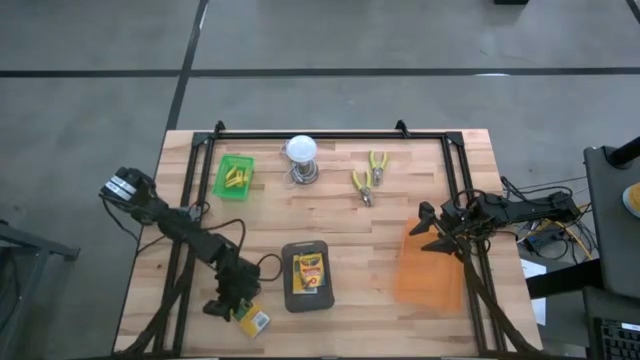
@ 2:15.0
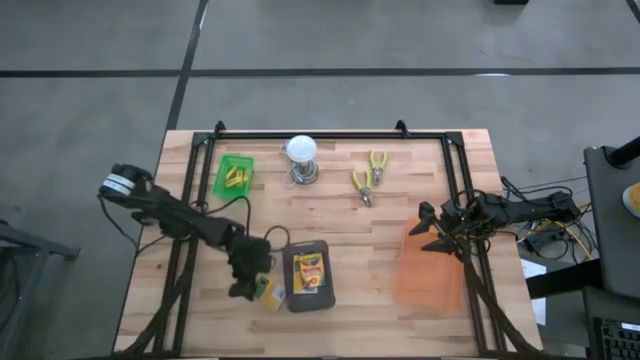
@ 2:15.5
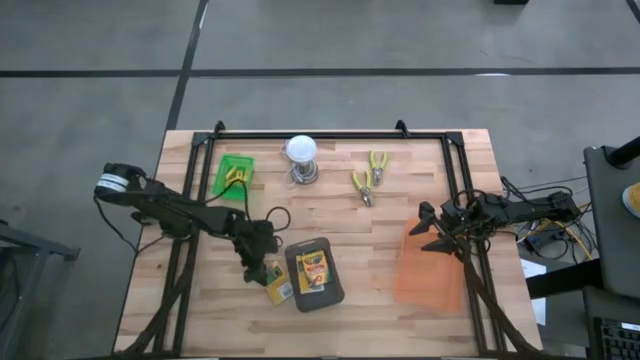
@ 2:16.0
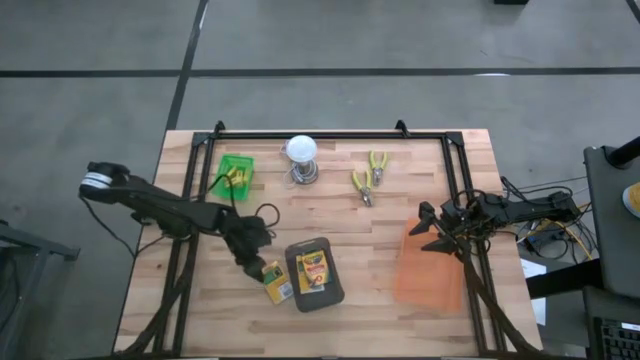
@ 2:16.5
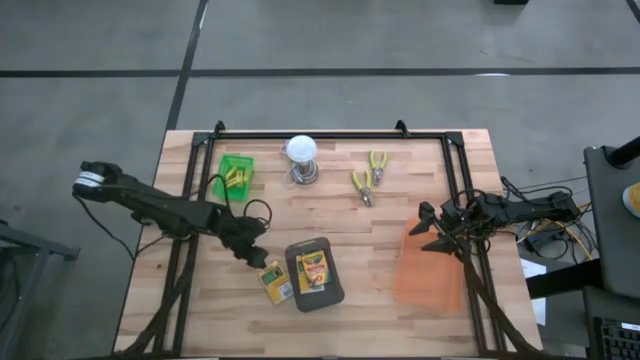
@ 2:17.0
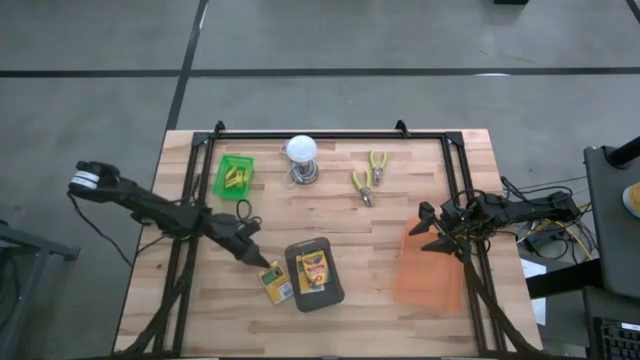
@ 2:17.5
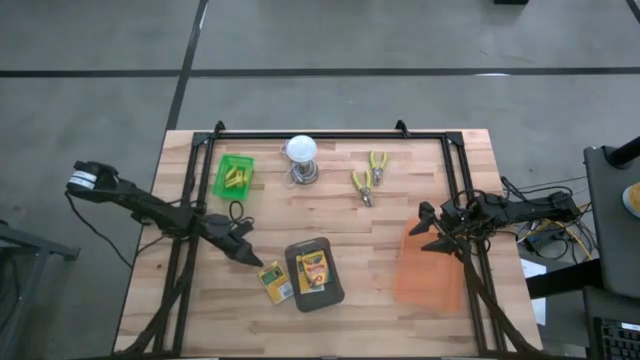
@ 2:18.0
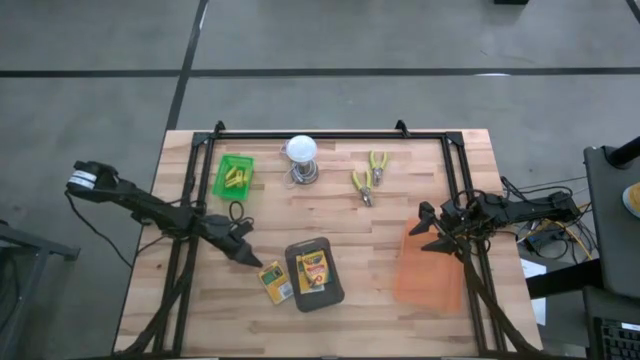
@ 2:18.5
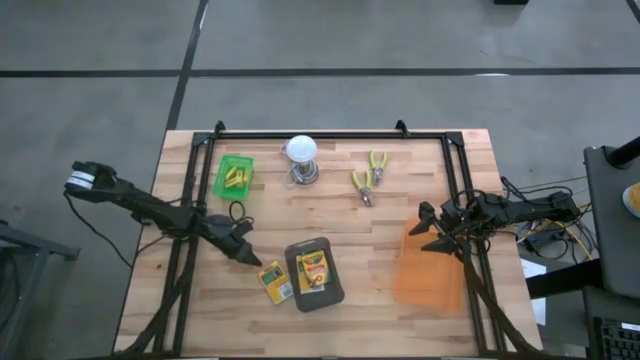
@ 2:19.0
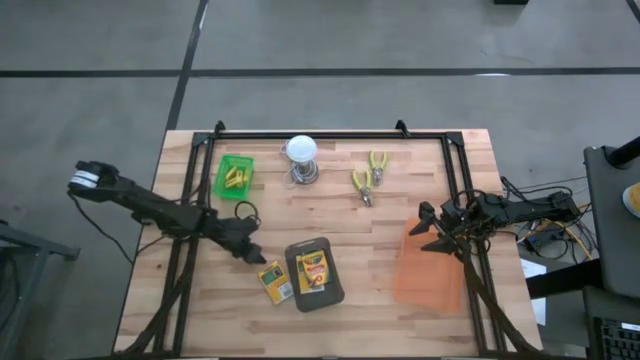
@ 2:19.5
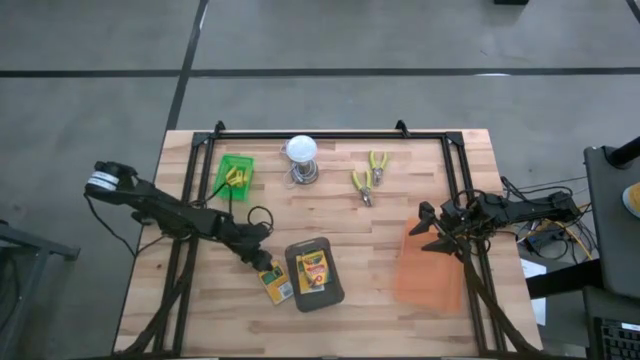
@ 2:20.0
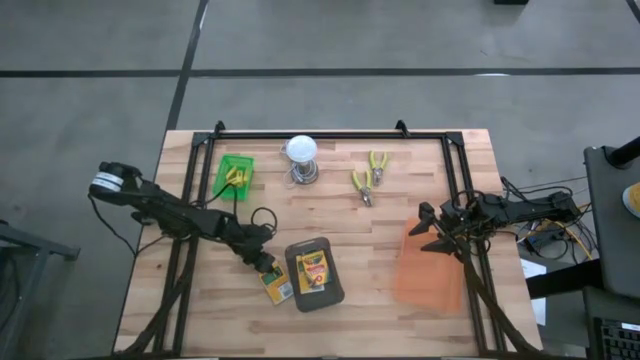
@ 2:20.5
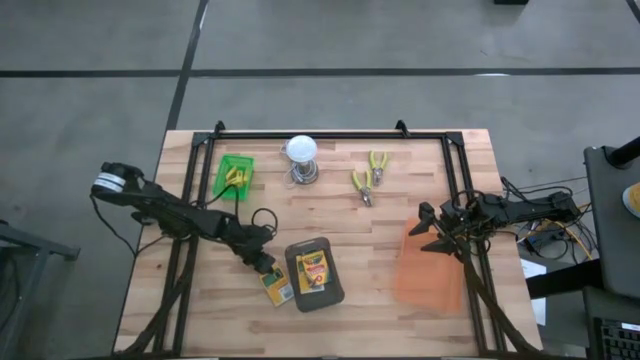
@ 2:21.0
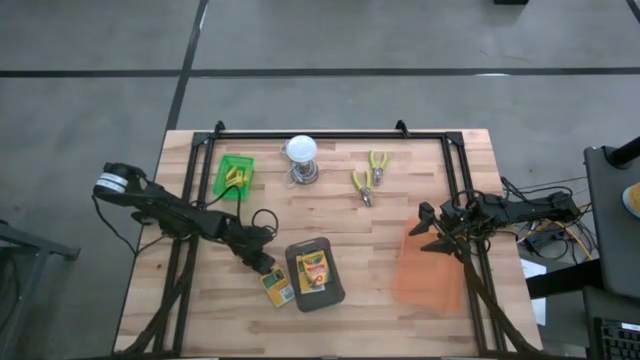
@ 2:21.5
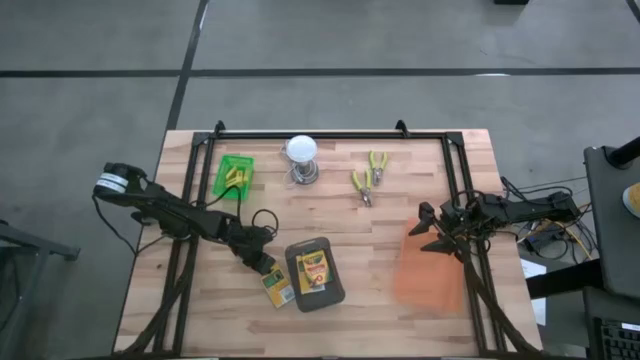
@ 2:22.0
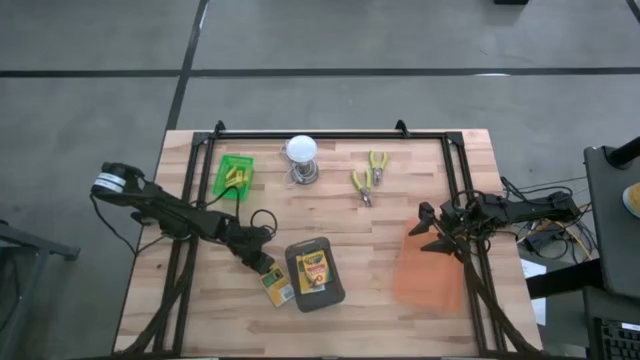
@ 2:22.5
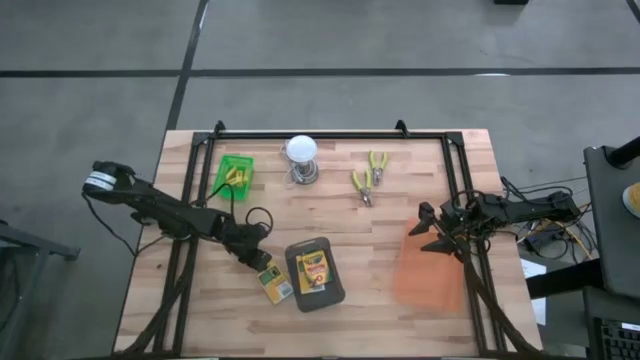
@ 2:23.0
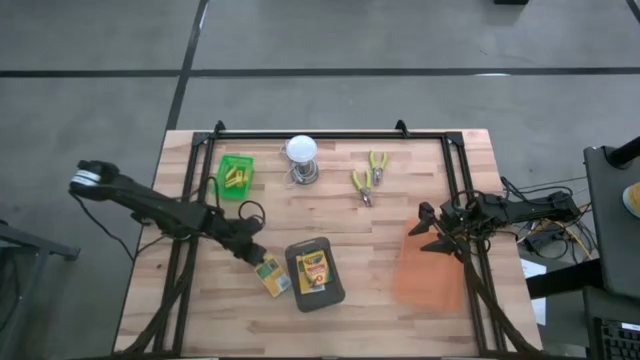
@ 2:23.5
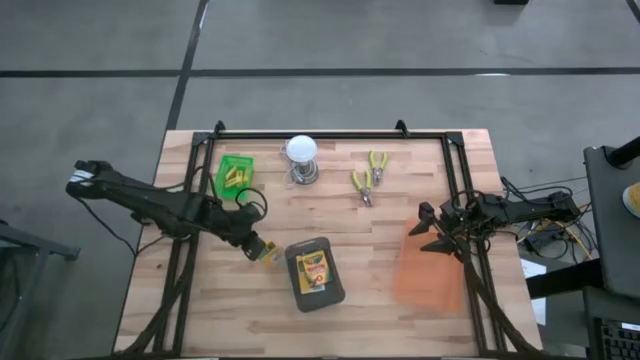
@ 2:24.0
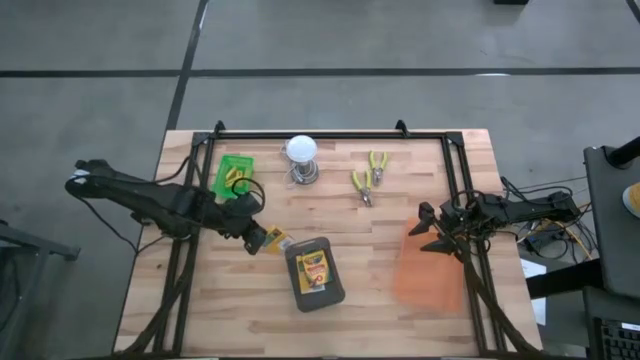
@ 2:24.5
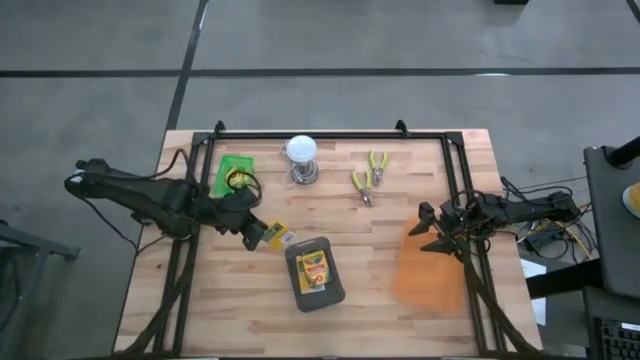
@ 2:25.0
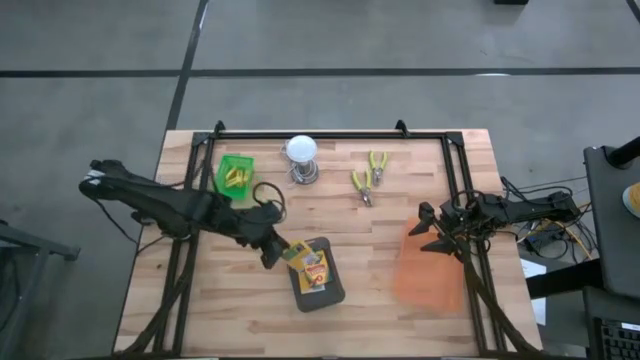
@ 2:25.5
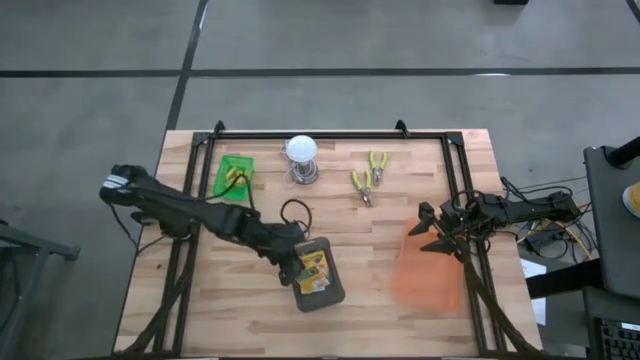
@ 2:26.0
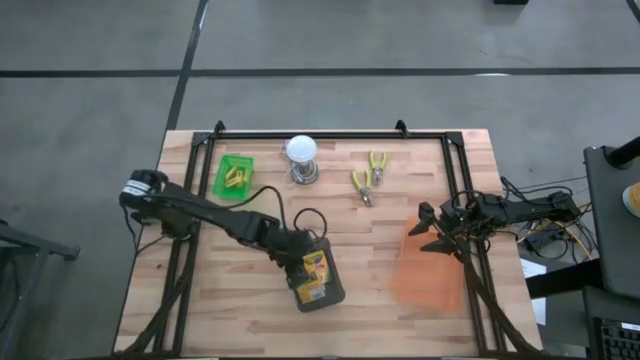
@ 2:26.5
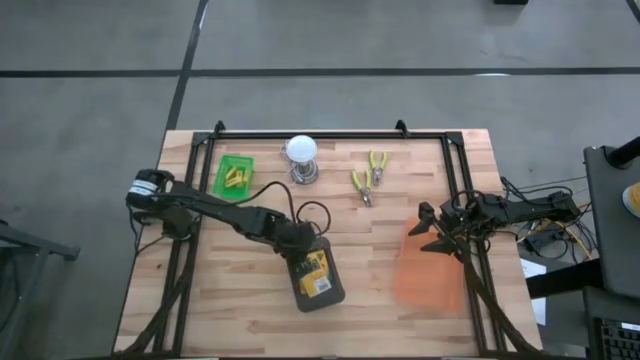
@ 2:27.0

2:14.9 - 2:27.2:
Task: Pick & Place School Supplies
Put the yellow crayon box into the black bin

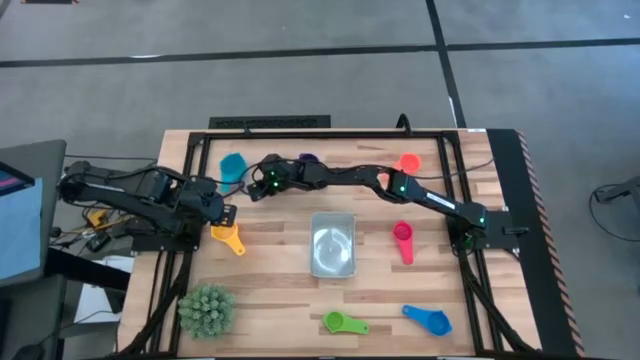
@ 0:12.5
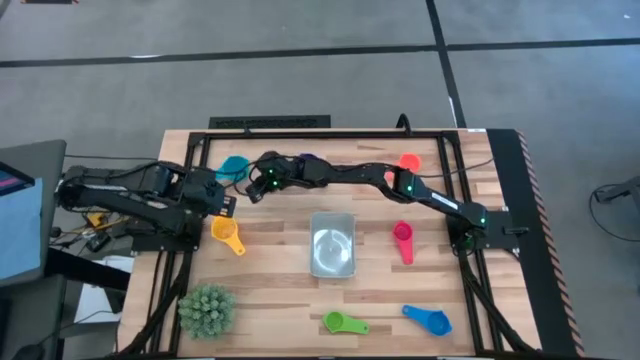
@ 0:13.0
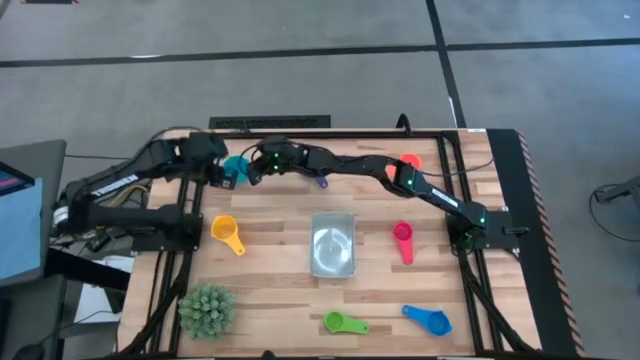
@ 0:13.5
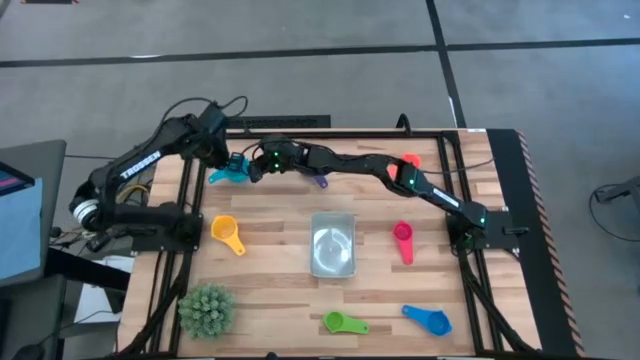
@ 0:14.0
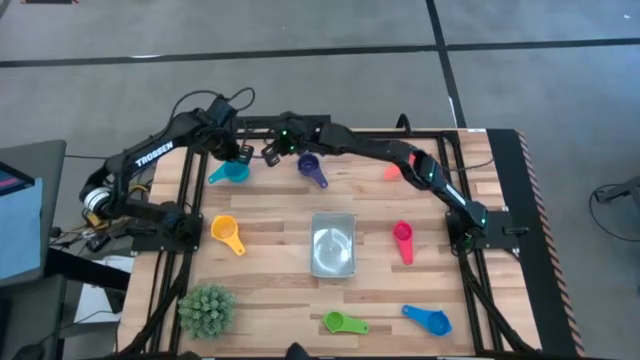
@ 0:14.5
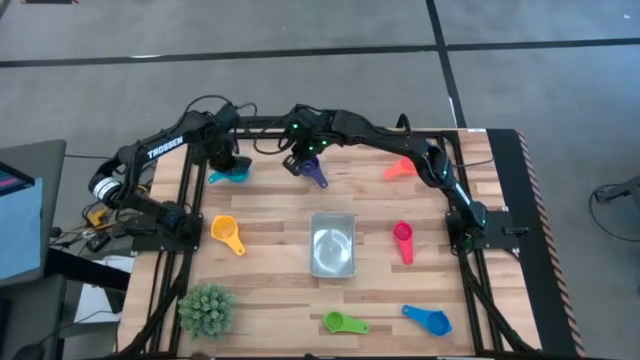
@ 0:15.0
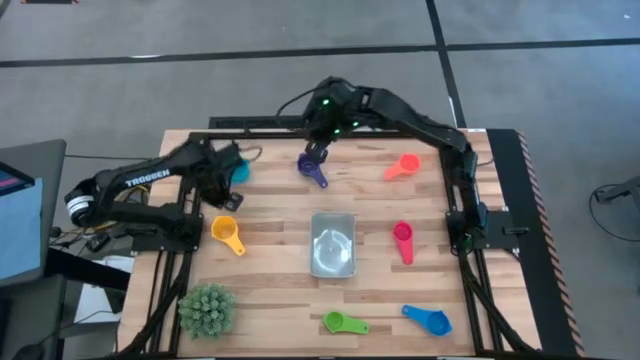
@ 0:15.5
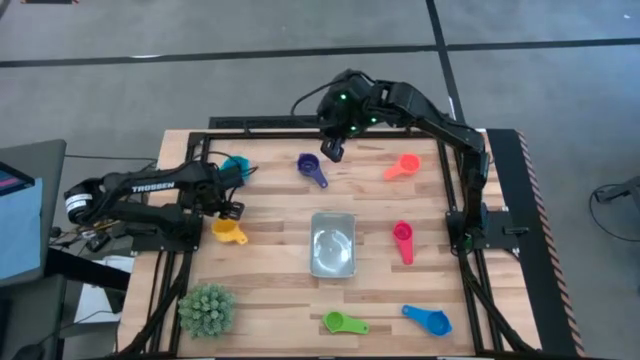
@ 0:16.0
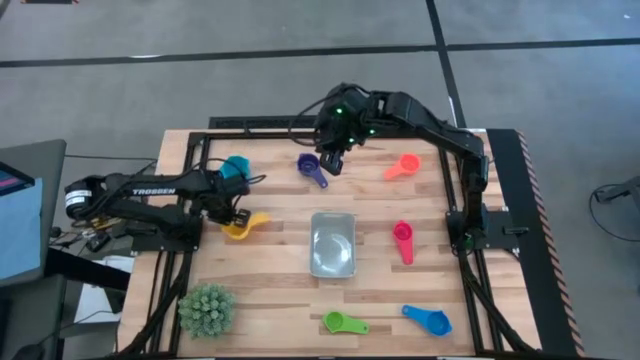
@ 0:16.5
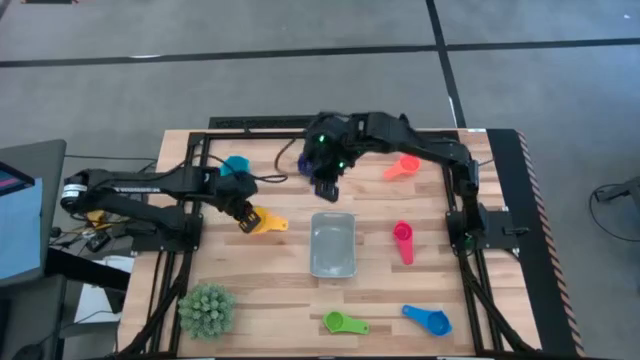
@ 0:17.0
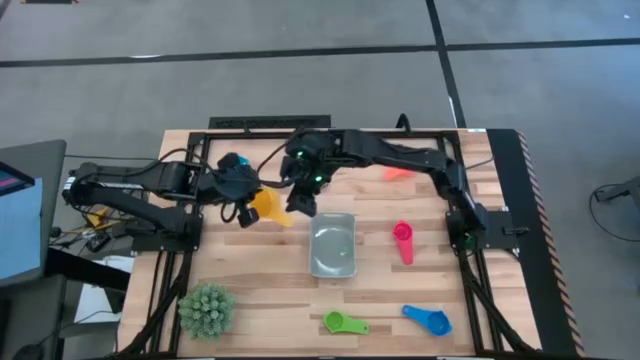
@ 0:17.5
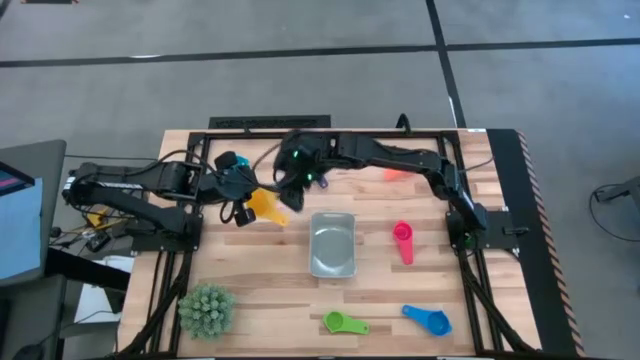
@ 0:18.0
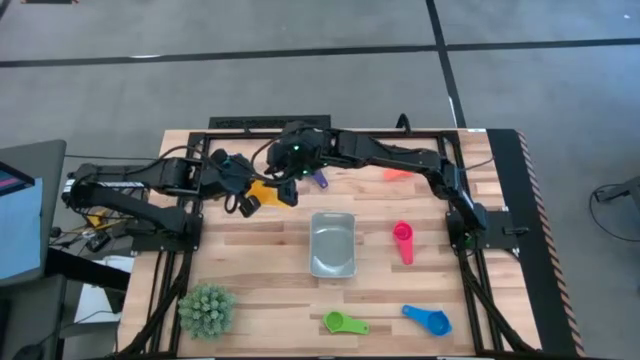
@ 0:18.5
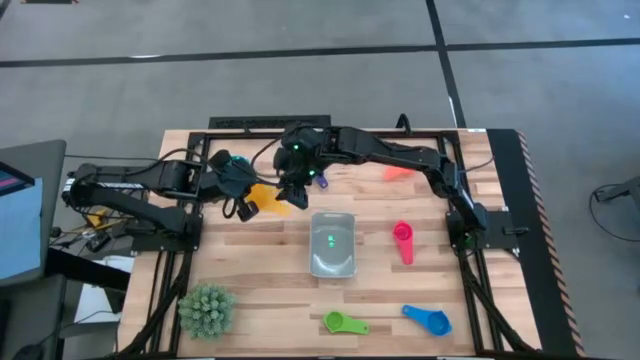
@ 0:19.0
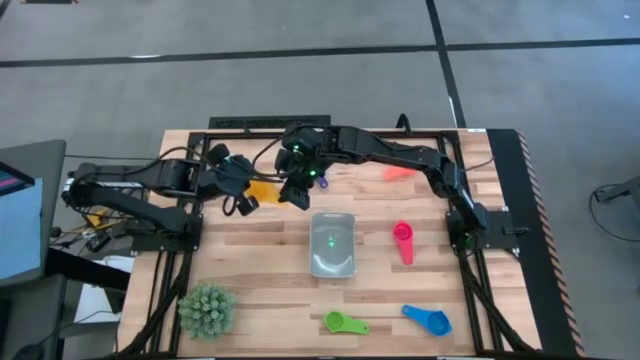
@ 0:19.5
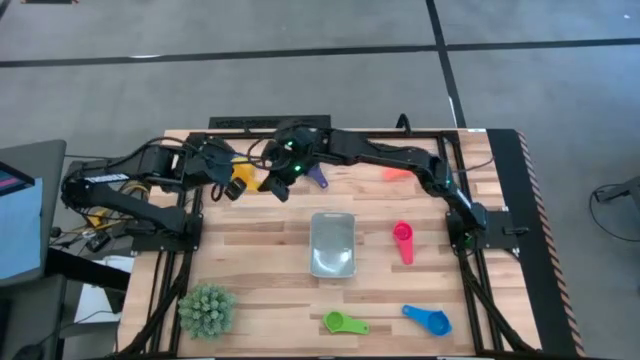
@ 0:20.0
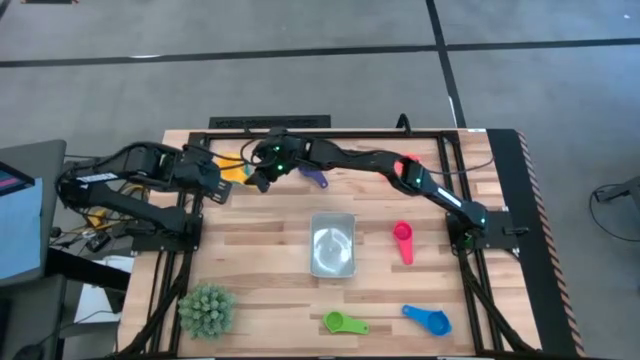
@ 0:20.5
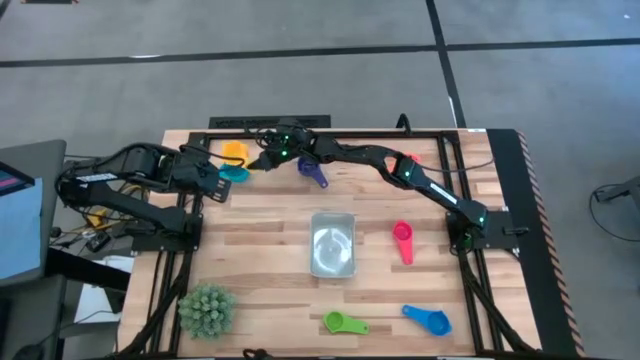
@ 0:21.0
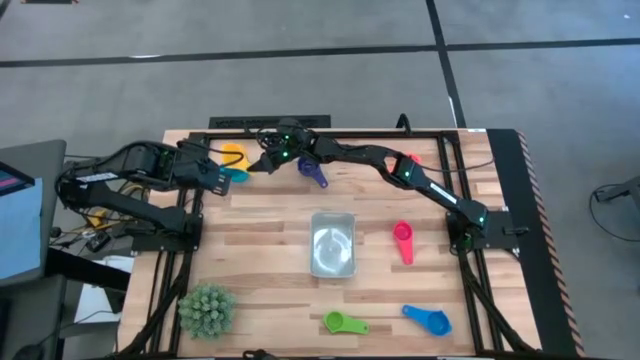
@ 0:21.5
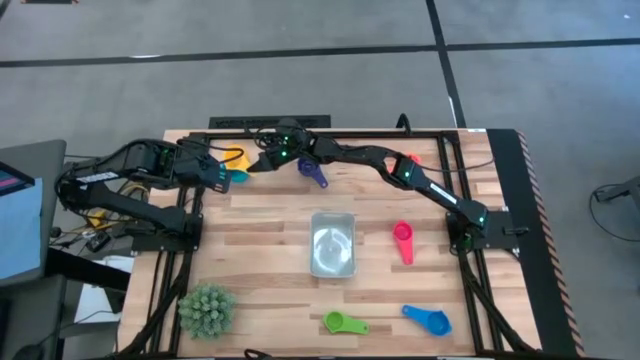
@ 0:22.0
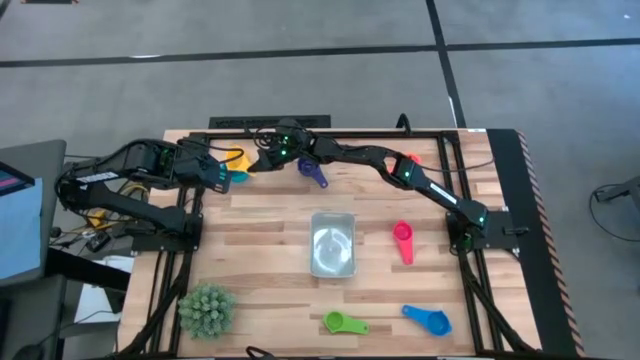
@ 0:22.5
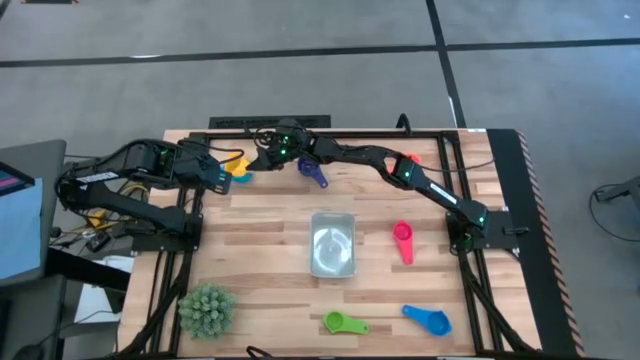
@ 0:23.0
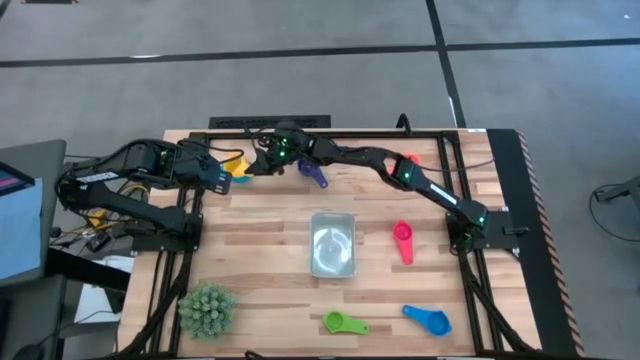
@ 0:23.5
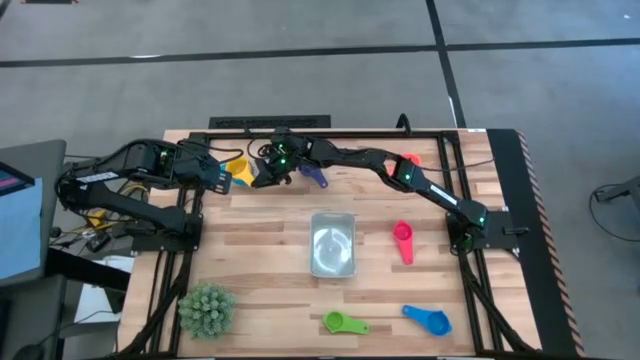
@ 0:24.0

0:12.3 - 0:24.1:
Task: Nest measuring cups in basket
Stack the yellow measuring cup on top of the light blue measuring cup
